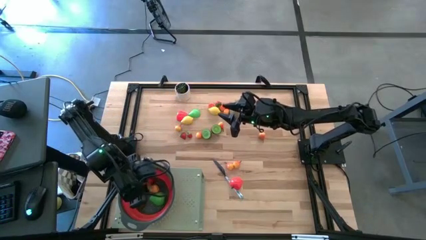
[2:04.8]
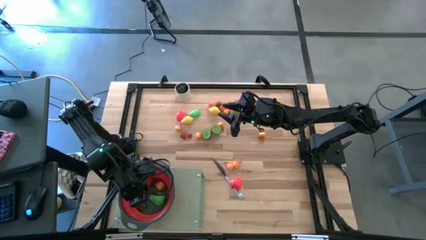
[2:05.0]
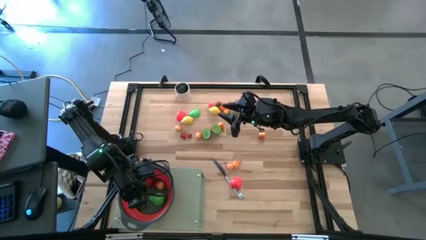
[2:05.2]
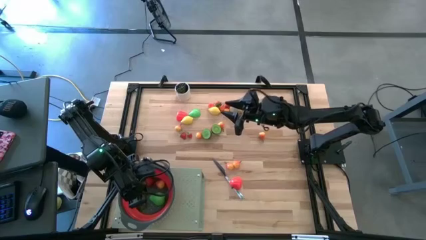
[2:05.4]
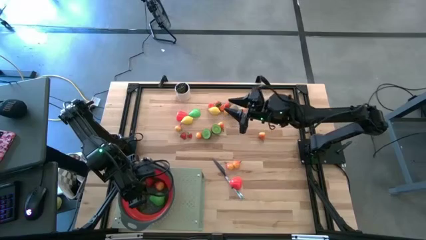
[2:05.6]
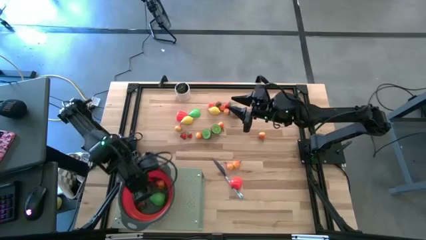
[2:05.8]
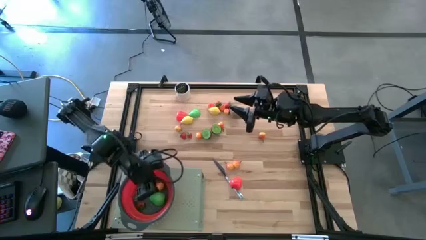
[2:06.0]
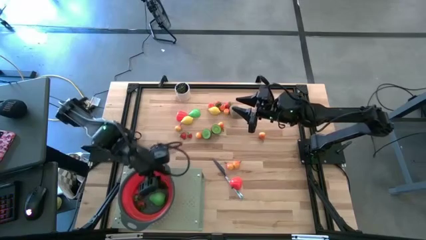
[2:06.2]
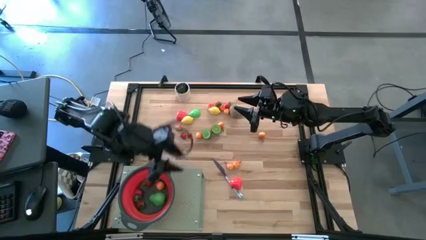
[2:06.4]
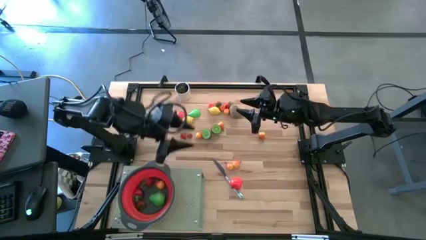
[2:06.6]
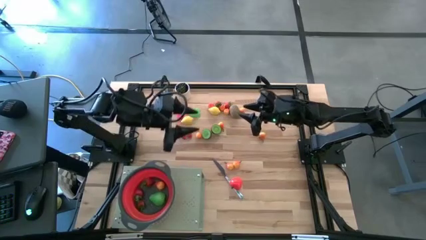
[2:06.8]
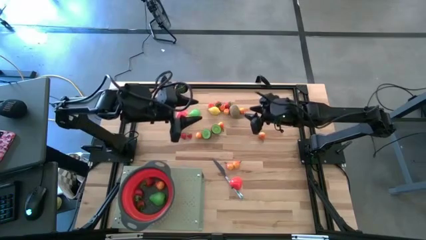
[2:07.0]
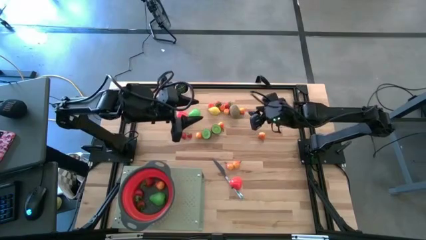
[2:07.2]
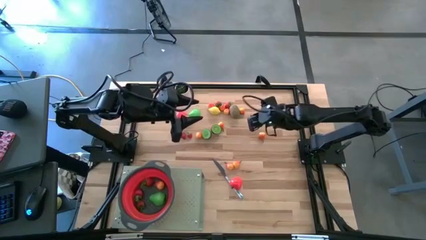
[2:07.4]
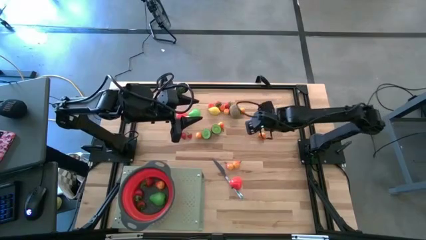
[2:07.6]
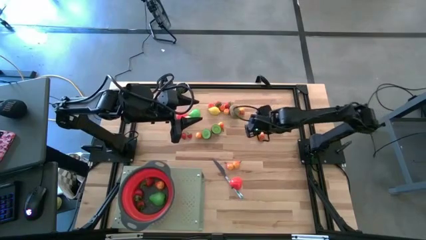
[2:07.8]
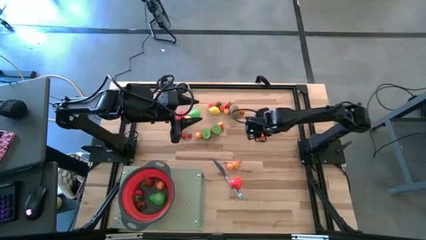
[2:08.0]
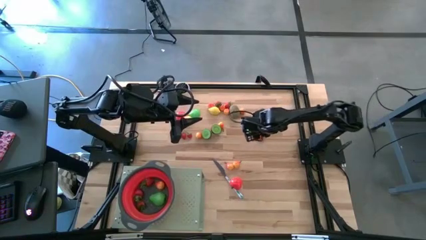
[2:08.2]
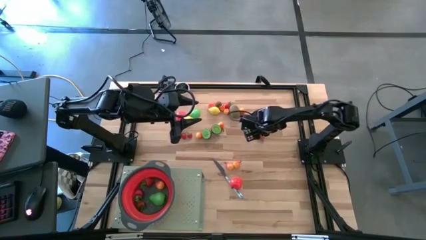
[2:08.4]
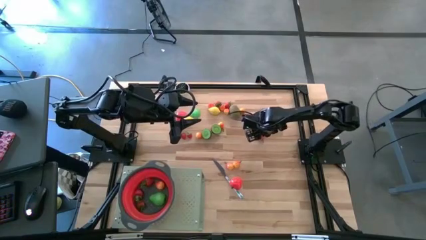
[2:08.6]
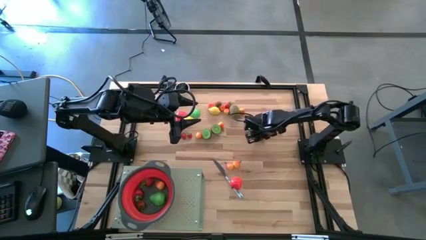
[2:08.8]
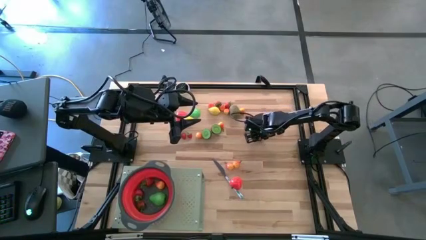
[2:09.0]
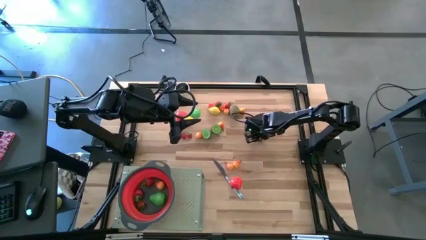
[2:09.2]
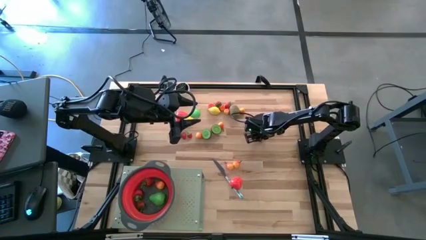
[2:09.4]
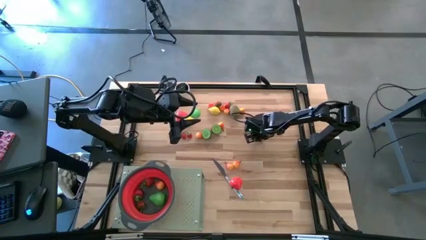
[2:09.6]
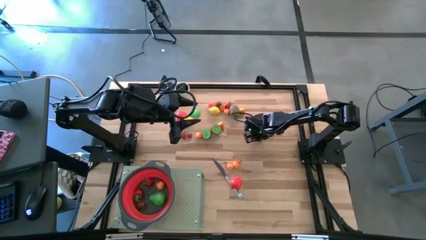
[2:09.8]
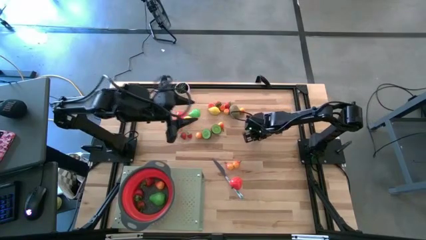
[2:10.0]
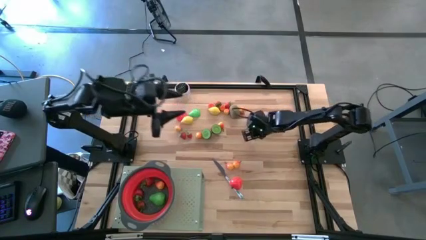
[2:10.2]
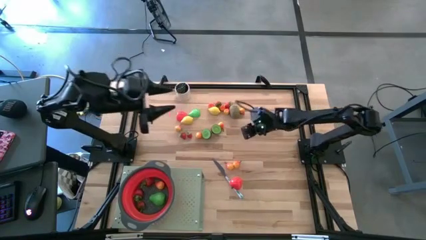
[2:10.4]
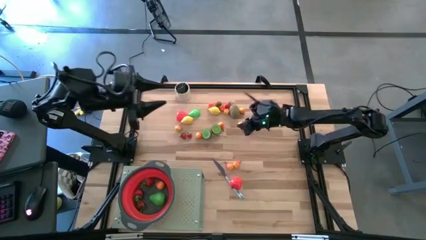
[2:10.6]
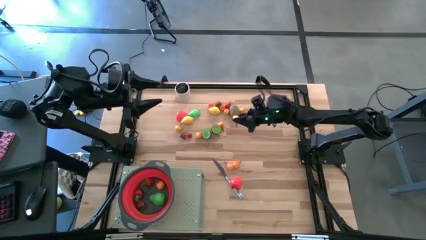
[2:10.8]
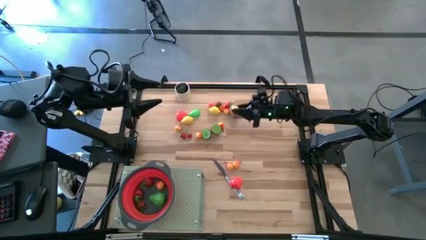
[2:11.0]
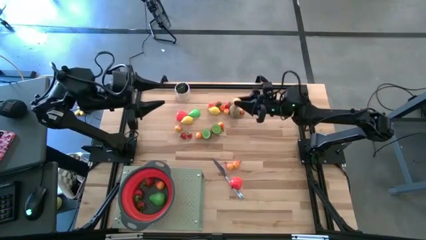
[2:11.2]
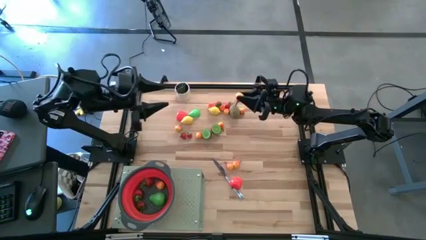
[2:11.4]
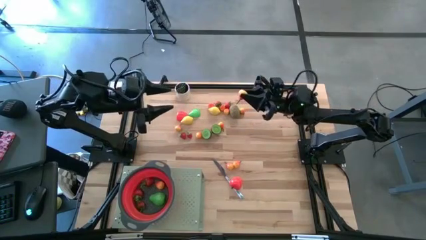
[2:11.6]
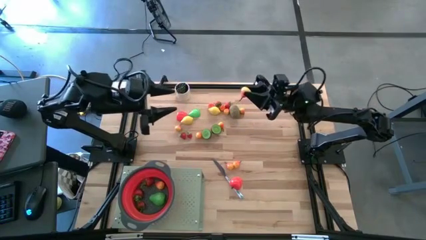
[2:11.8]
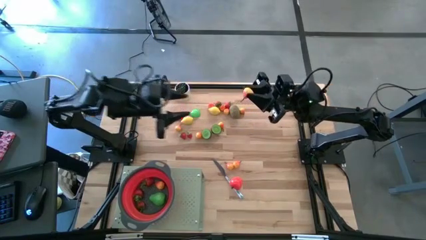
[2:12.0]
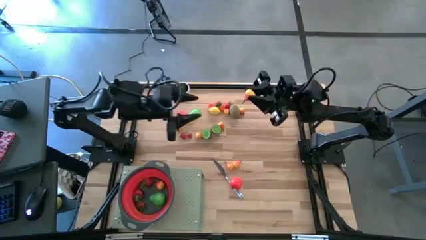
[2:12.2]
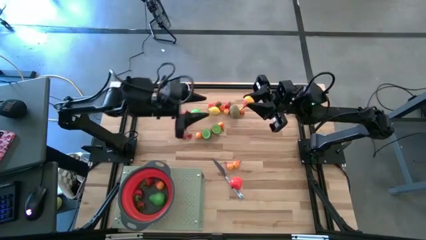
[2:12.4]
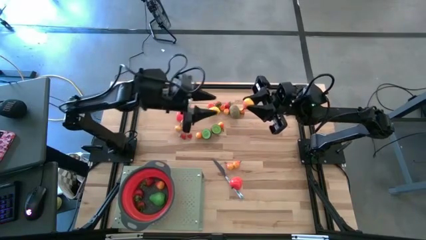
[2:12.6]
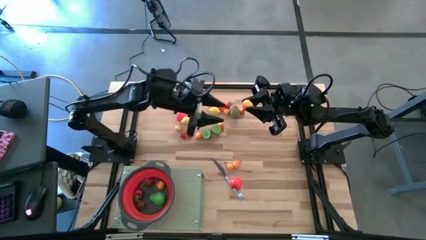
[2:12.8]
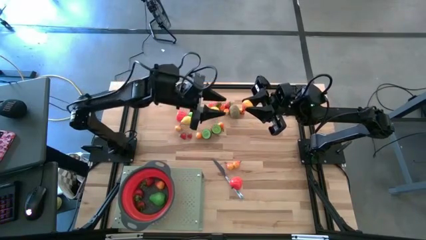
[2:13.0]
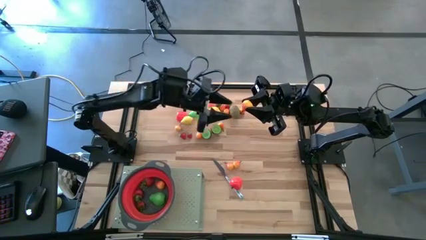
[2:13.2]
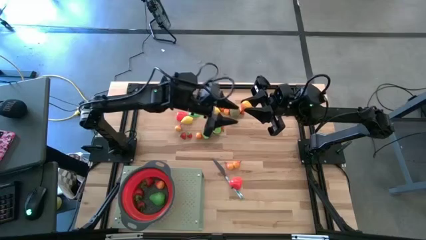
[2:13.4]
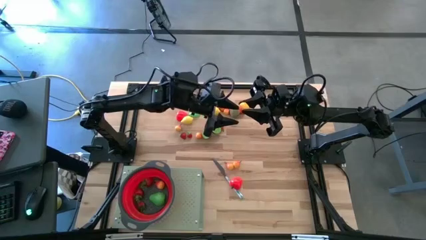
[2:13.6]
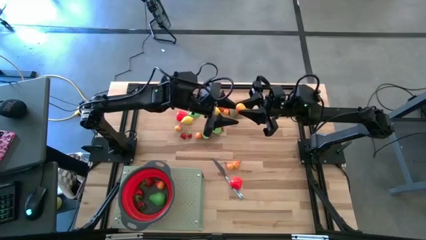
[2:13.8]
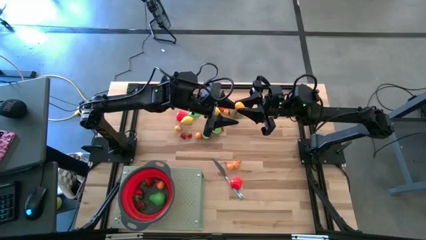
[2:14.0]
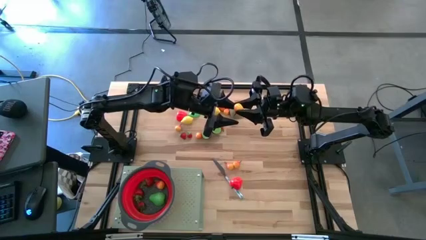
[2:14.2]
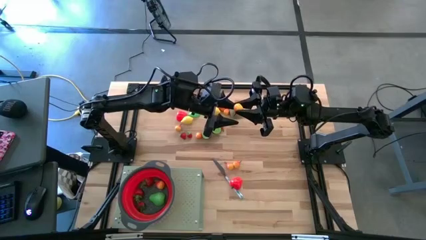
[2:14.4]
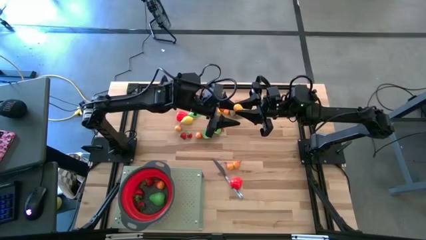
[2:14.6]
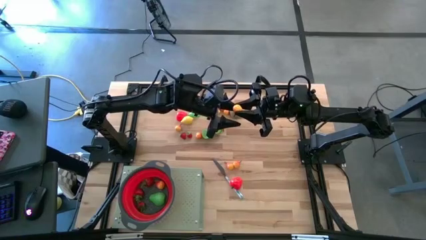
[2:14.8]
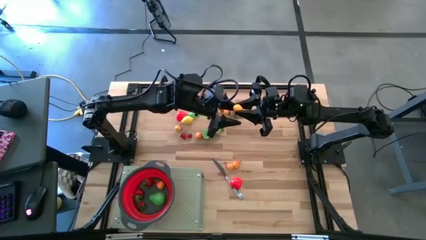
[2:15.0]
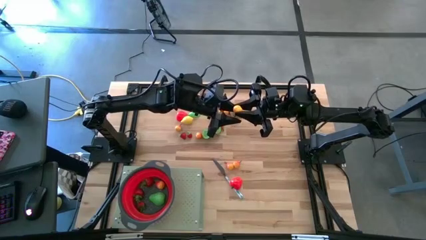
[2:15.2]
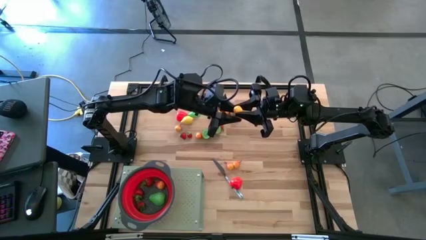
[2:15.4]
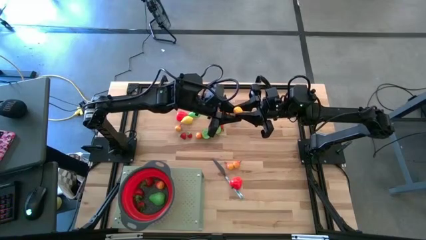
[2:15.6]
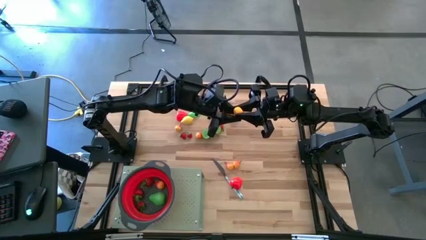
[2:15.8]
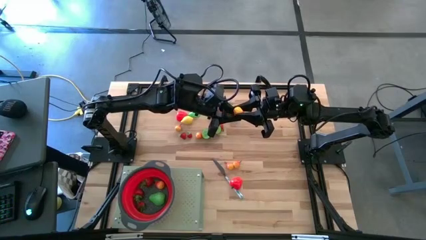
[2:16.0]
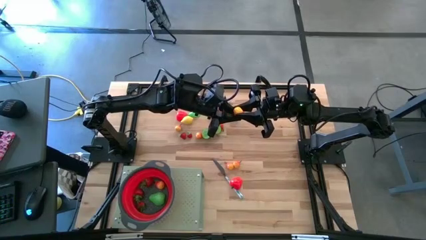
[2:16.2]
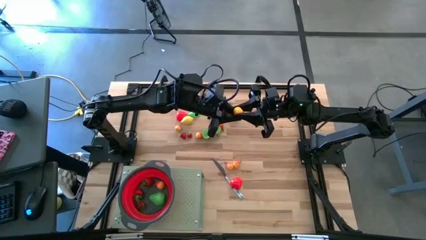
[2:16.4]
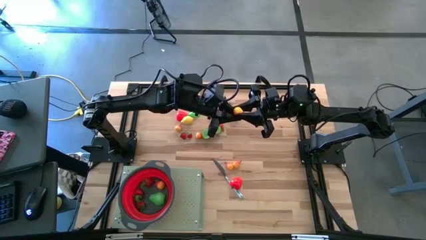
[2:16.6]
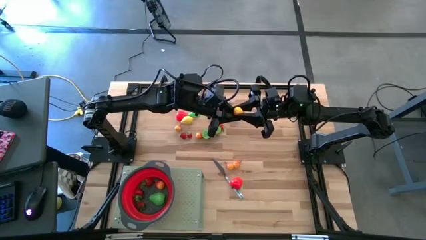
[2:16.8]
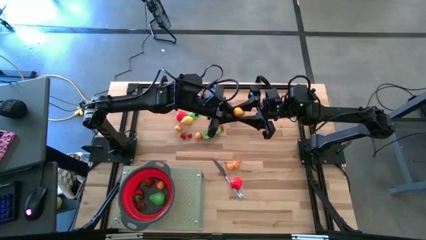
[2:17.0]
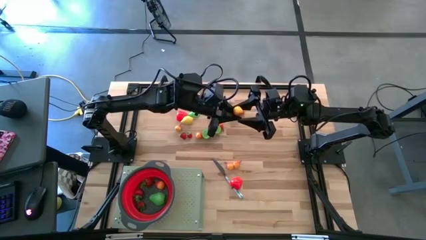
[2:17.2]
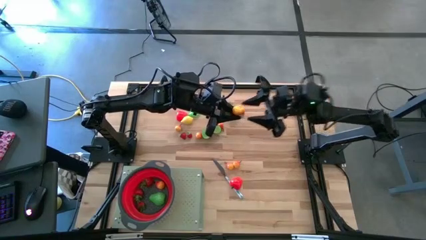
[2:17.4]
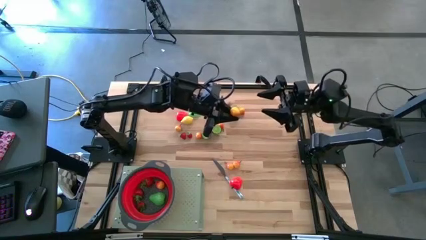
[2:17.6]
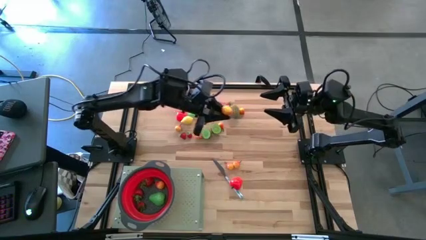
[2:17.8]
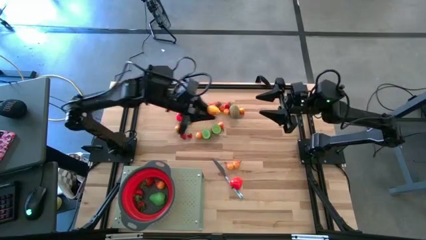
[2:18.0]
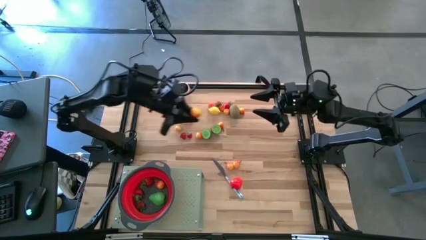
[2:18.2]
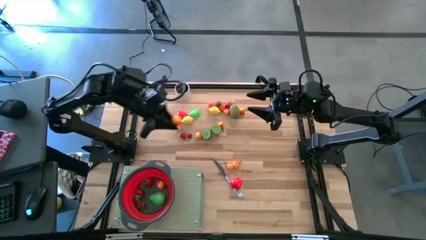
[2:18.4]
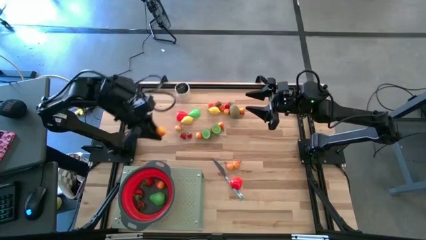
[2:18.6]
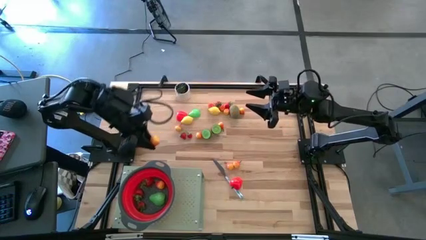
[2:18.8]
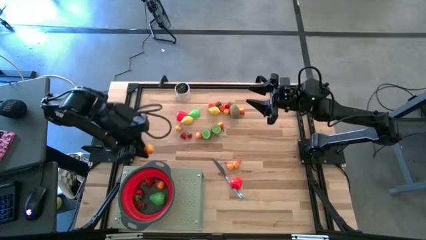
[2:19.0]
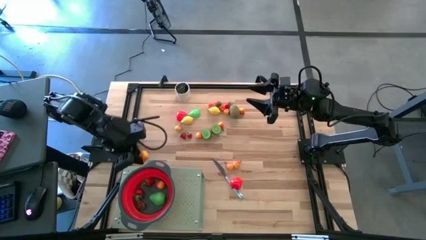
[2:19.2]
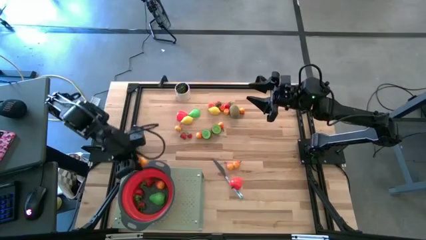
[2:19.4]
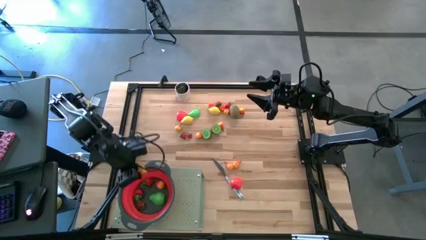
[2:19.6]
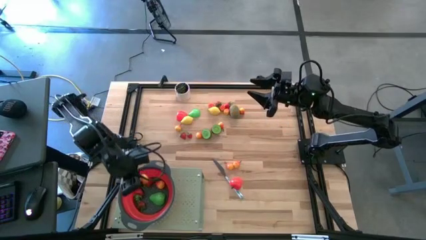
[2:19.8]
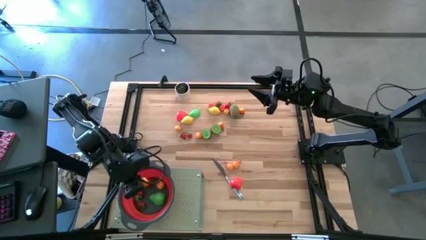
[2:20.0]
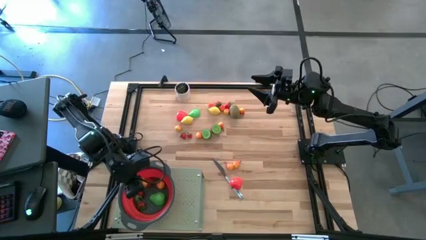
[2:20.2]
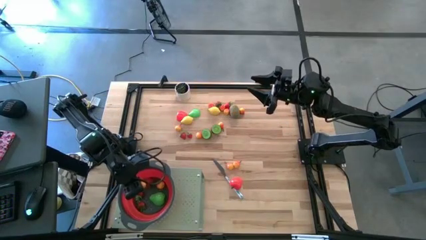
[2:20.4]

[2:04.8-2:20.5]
Task: Pick & Place Fruit
Put the pear into the red strainer bowl on the shelf
